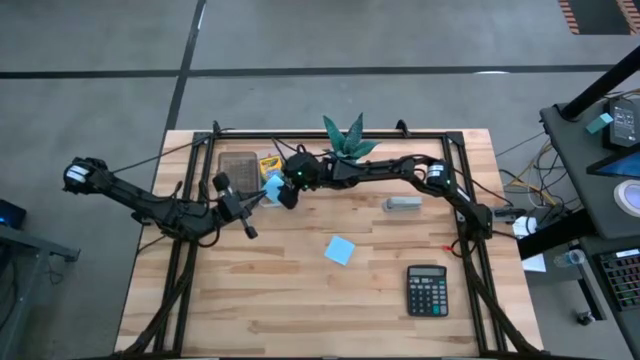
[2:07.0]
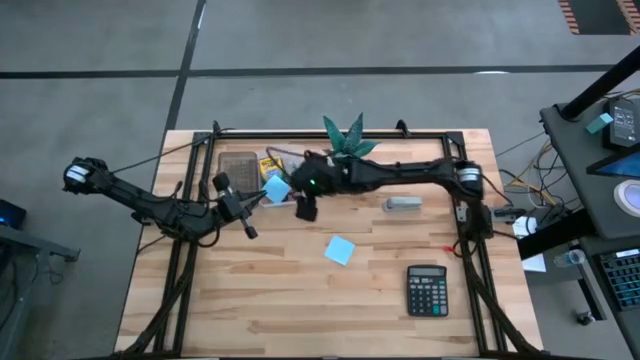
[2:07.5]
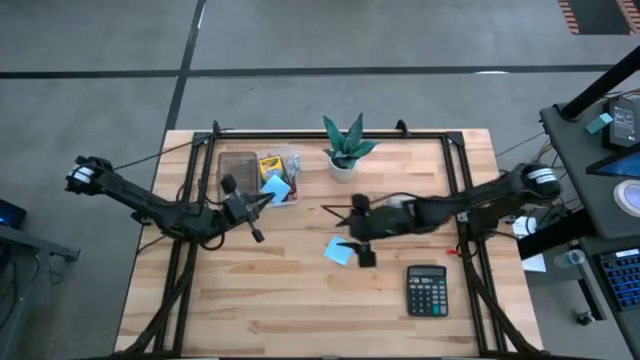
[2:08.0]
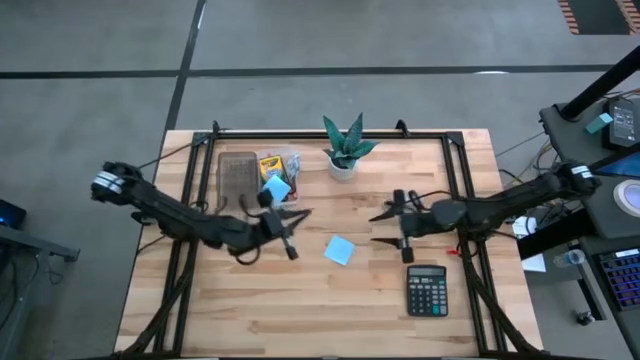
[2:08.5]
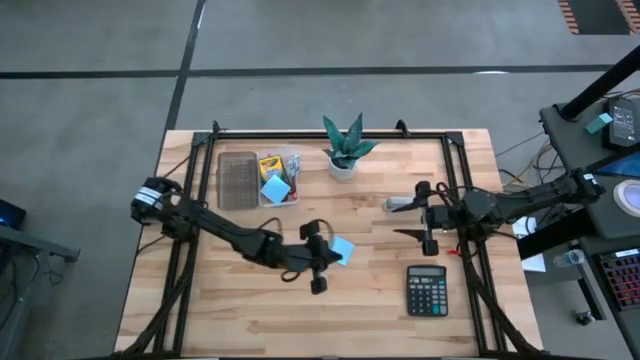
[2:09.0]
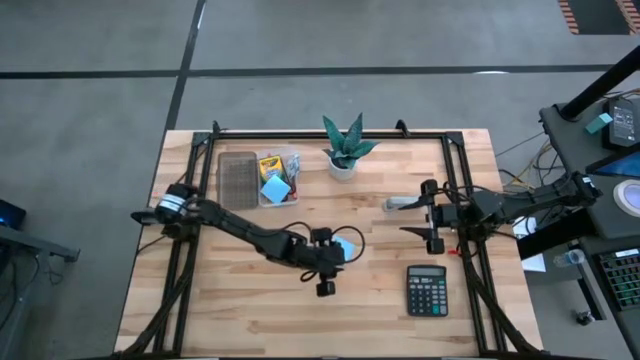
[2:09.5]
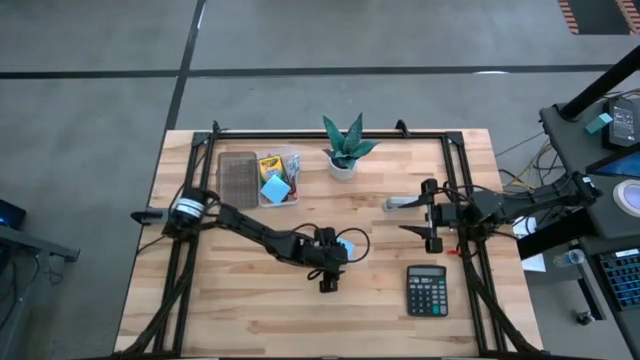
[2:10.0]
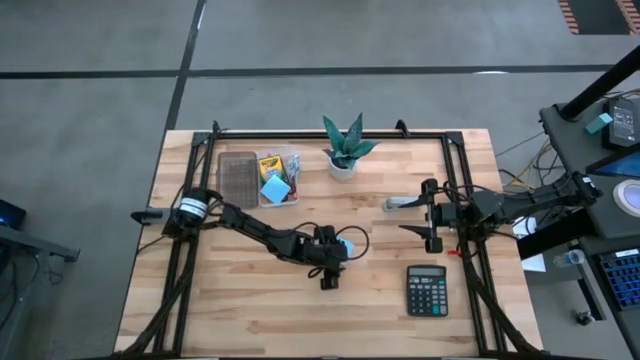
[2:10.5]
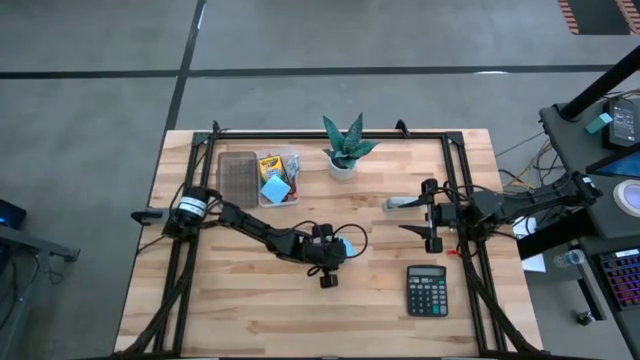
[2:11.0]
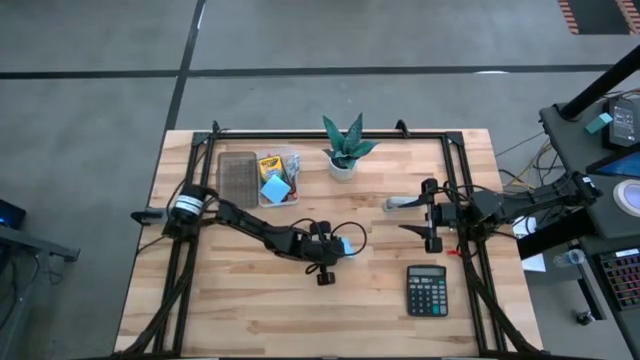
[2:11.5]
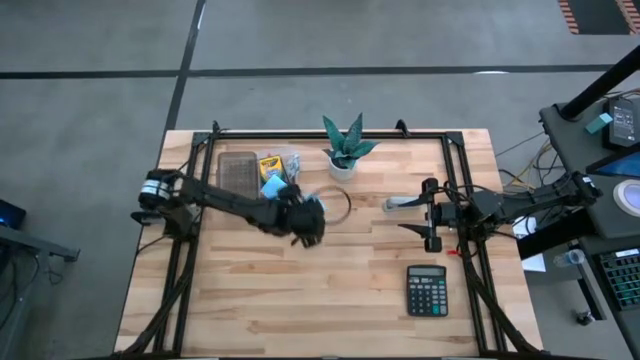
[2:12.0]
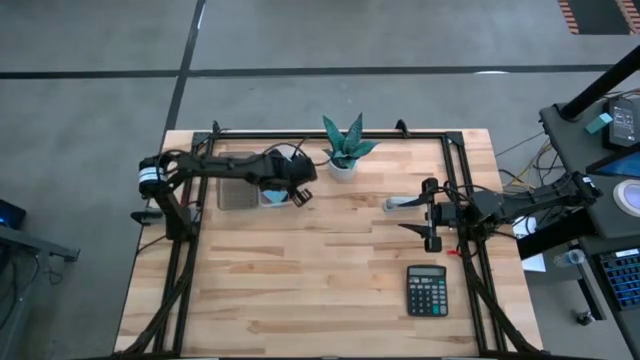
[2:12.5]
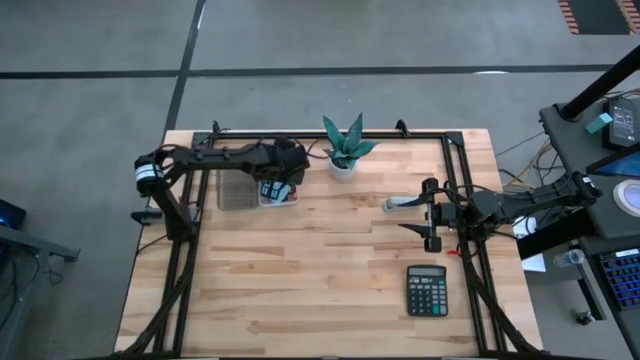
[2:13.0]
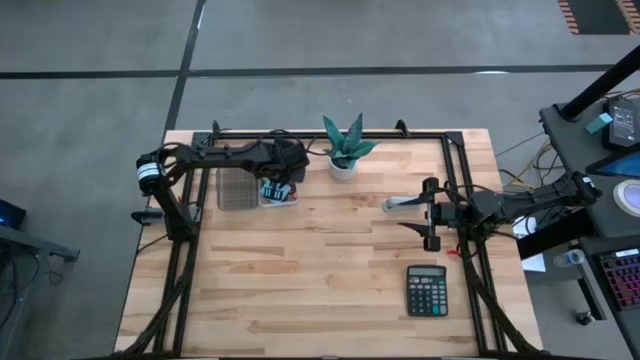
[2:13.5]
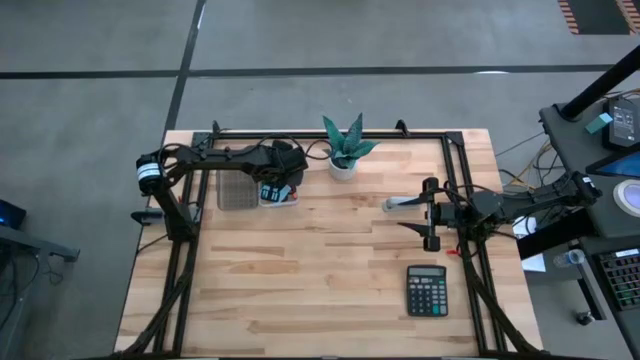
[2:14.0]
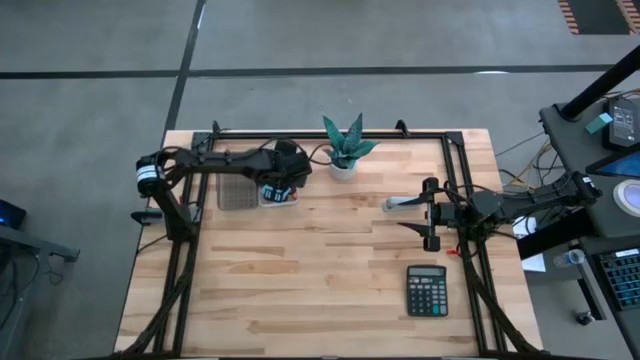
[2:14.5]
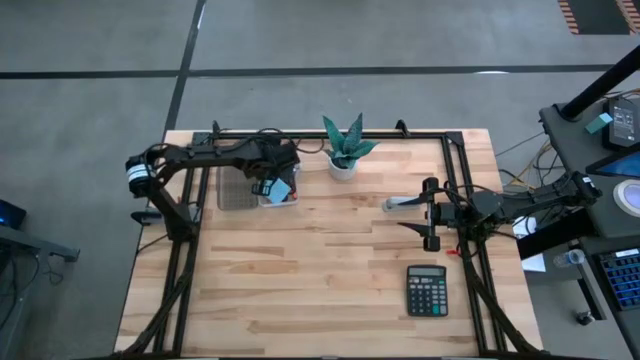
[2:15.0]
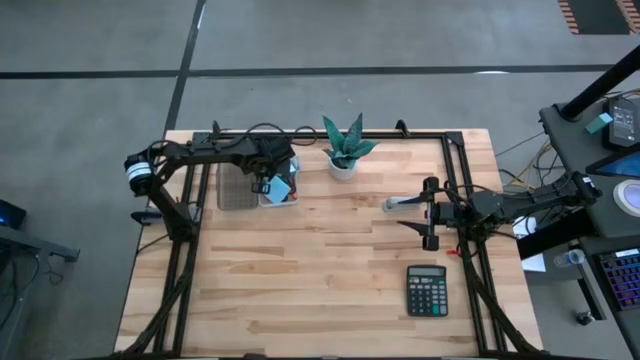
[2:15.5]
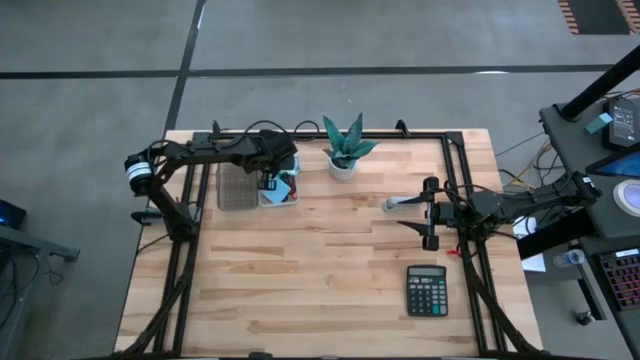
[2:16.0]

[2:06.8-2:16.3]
Task: Pack school essentials
Put the blue sticky note into the black supply box

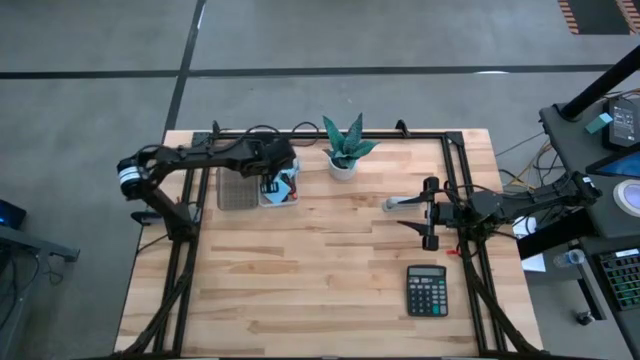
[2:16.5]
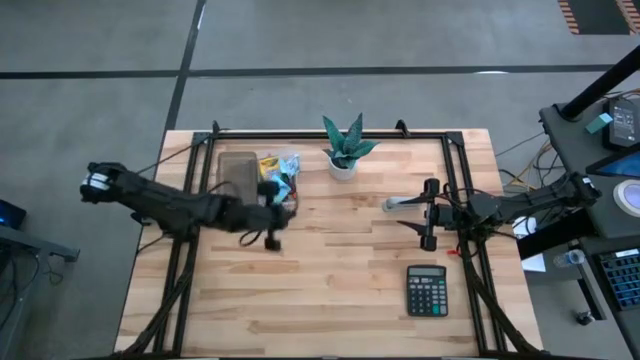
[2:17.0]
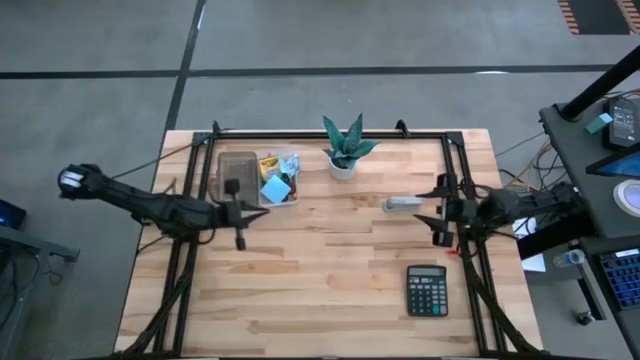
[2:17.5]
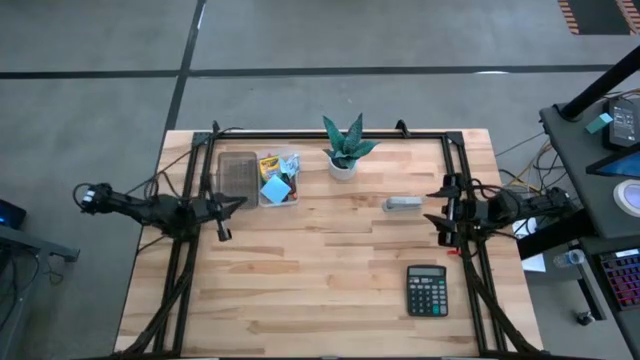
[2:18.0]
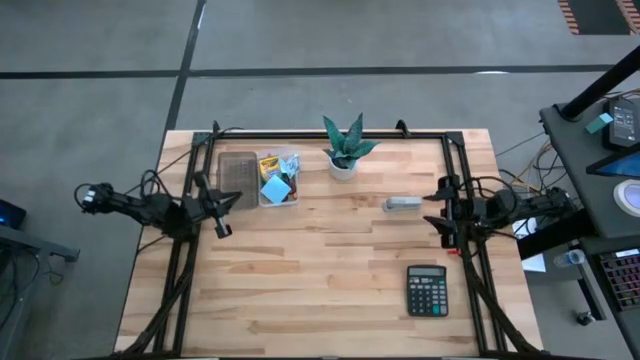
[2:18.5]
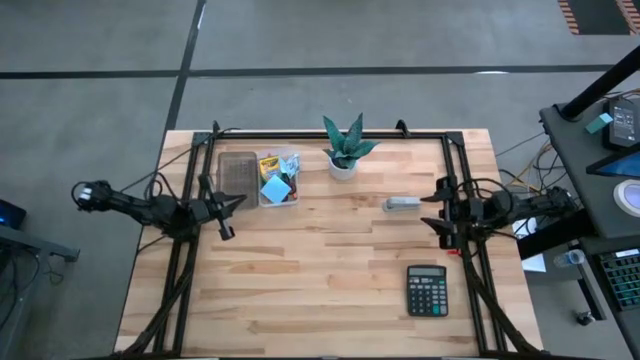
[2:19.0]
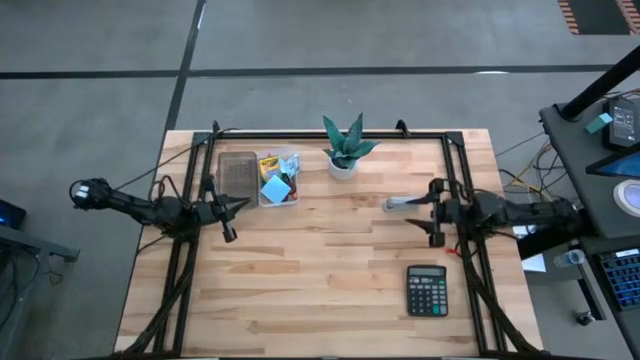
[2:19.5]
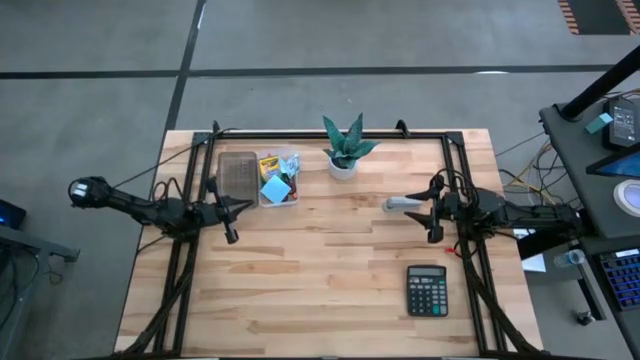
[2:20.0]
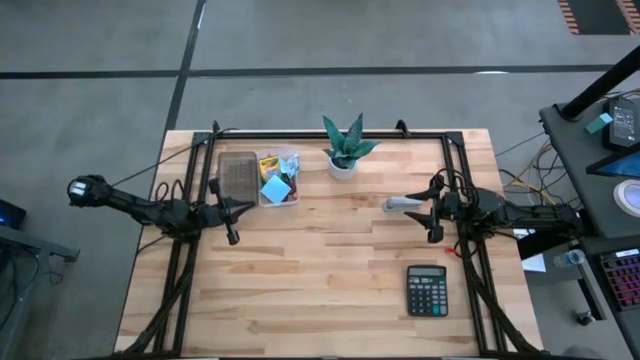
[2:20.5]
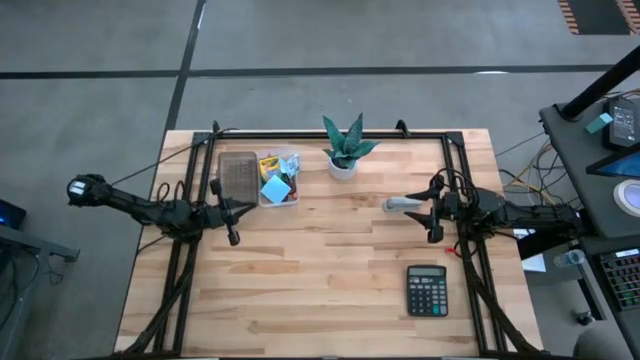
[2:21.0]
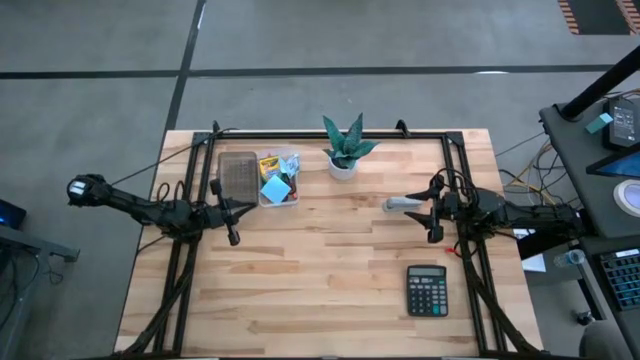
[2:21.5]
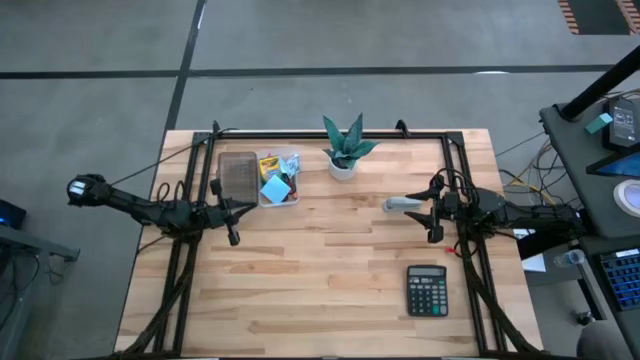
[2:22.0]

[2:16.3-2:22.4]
Return to Home Position

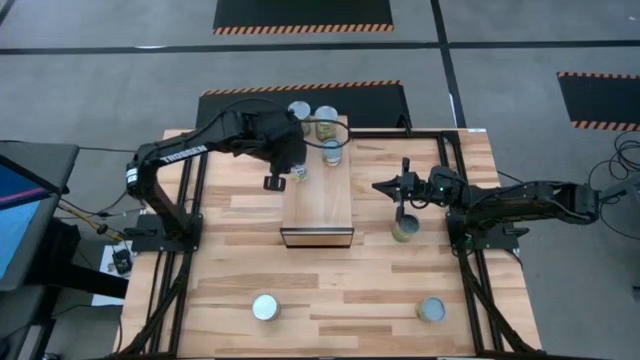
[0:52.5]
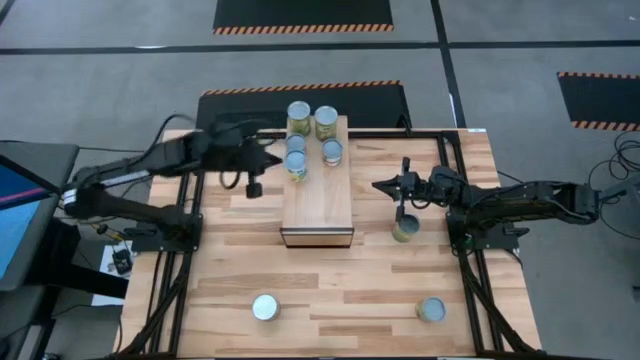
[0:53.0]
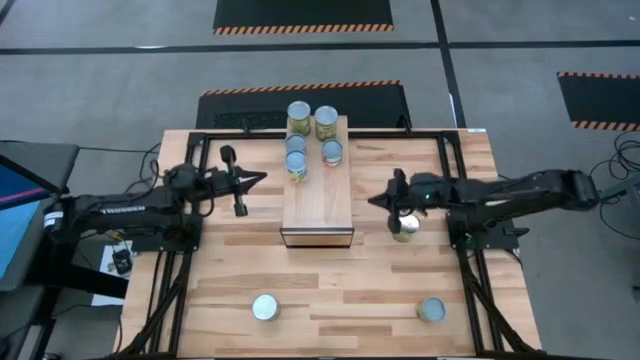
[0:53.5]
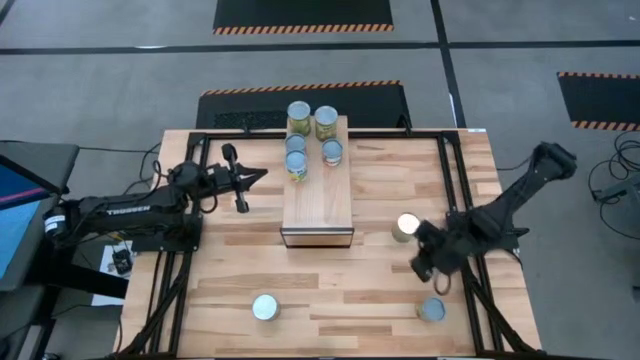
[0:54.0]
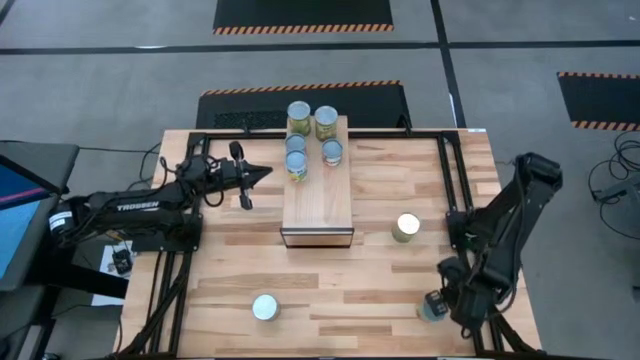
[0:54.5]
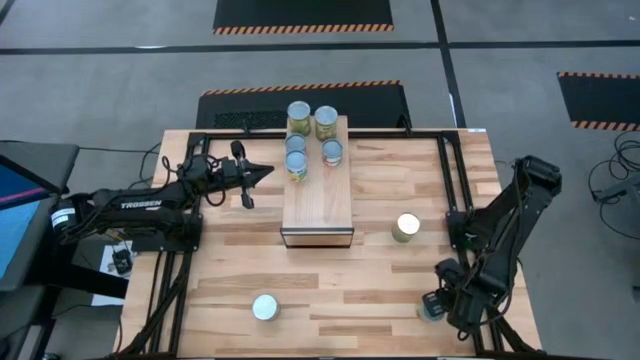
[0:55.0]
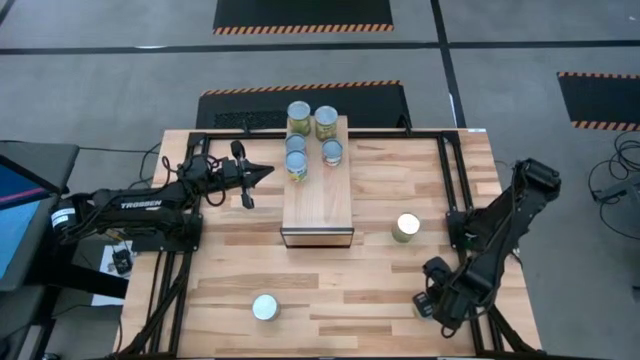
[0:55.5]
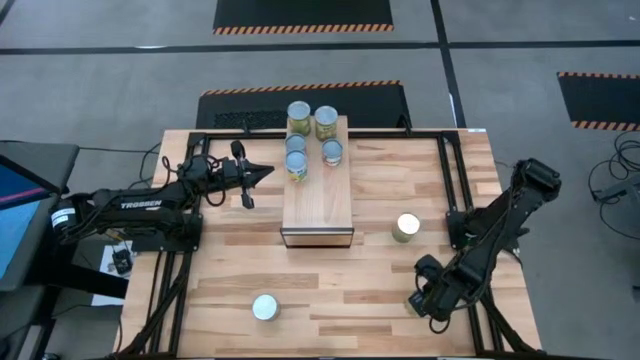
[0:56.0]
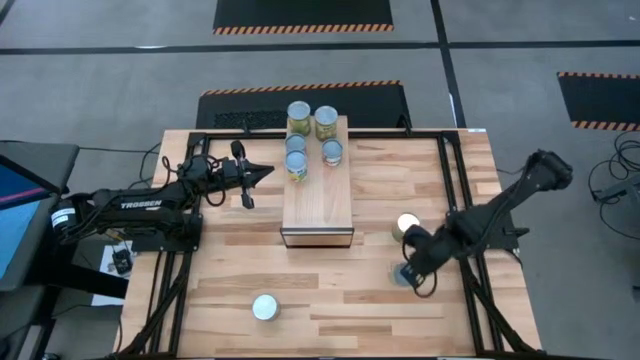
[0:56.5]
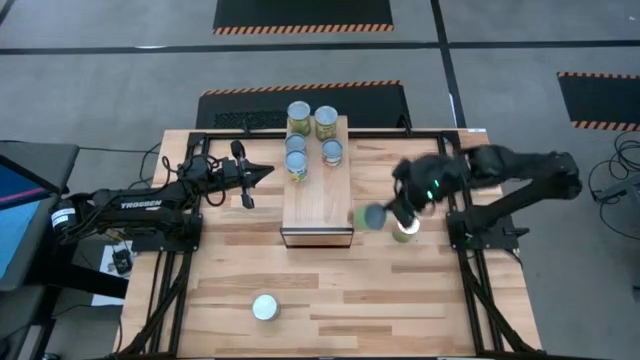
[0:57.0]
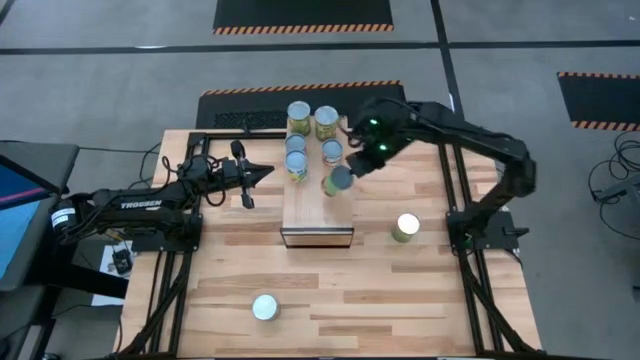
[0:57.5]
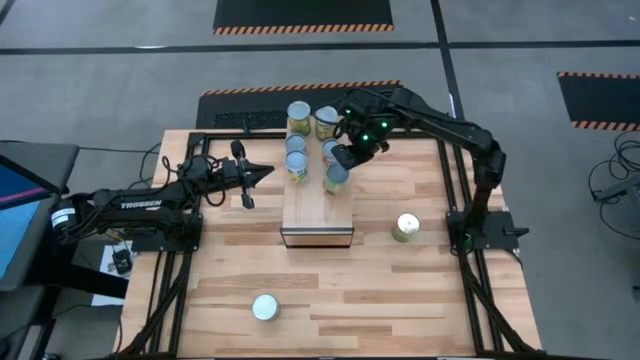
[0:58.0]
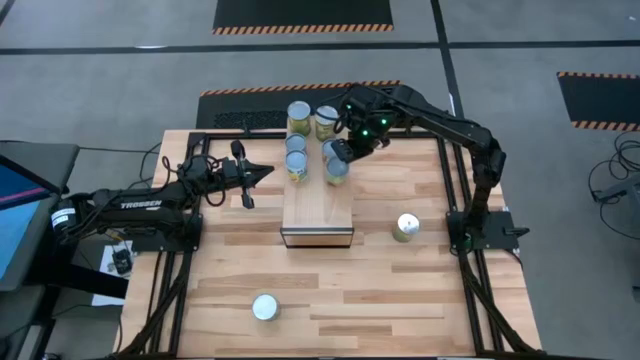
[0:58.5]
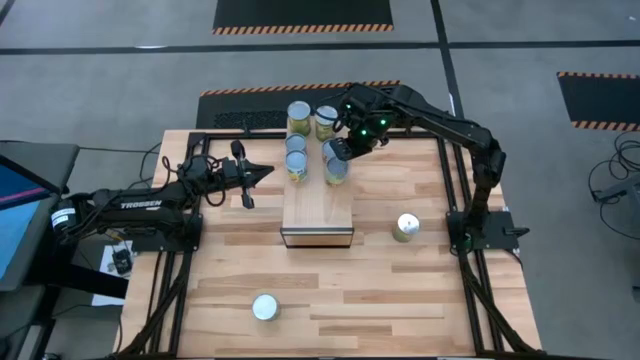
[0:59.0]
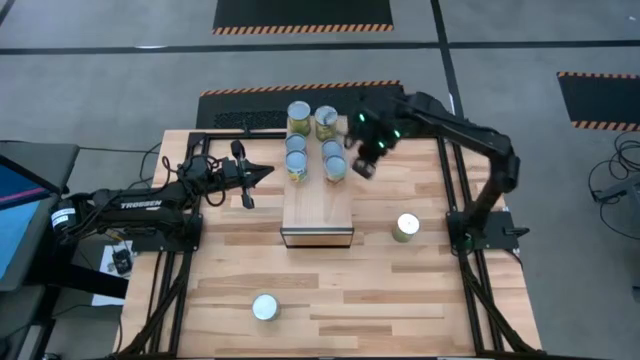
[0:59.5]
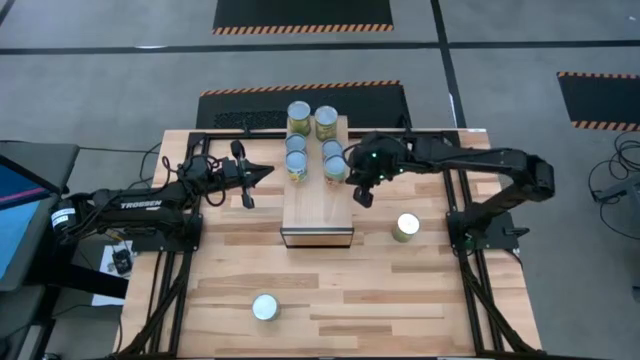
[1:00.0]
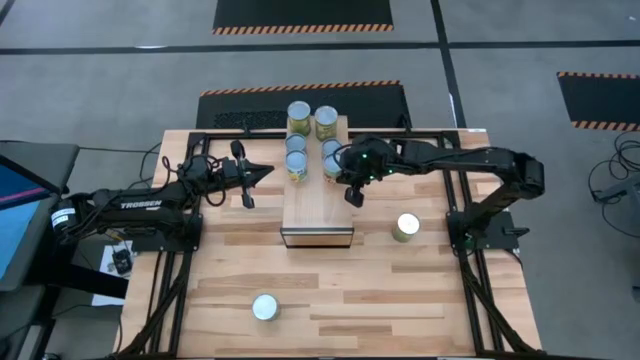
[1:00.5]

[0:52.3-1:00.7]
Task: Pick and place cans onto a shelf
Put the canned spaghetti sauce on the shelf
